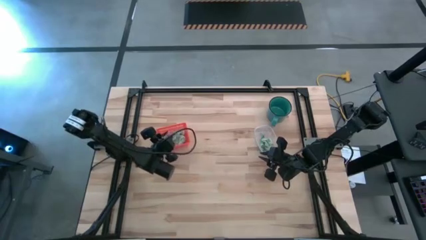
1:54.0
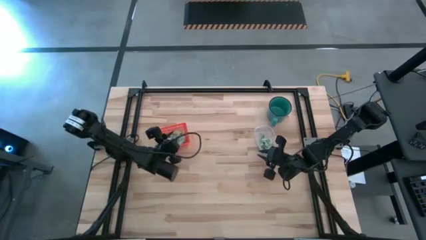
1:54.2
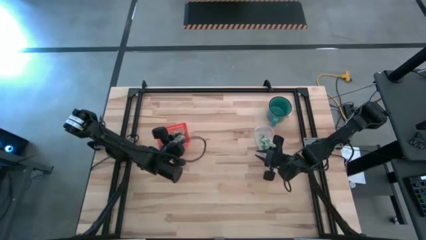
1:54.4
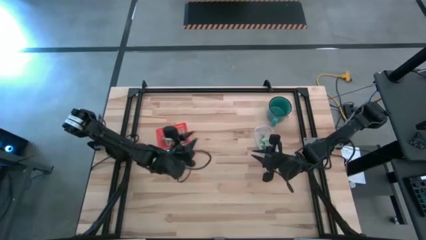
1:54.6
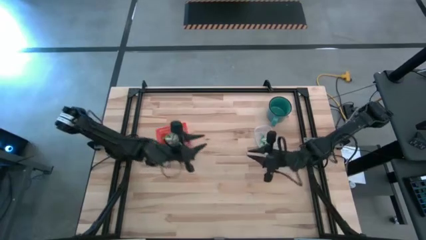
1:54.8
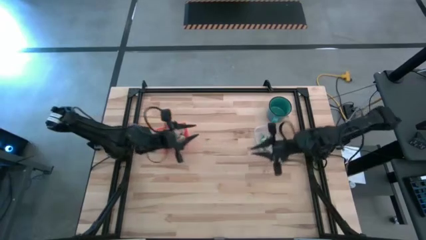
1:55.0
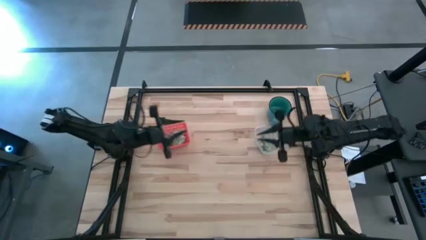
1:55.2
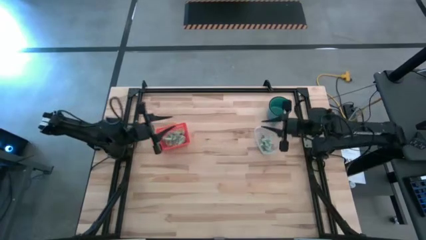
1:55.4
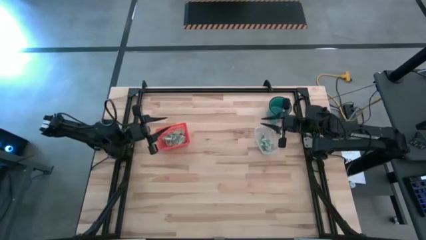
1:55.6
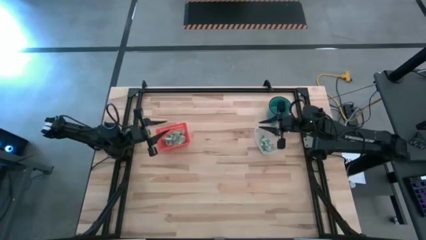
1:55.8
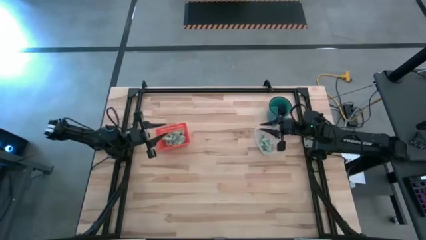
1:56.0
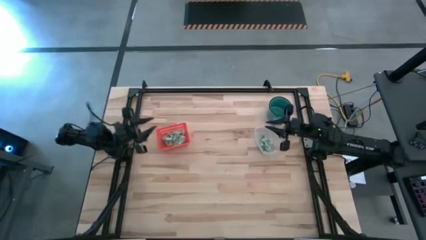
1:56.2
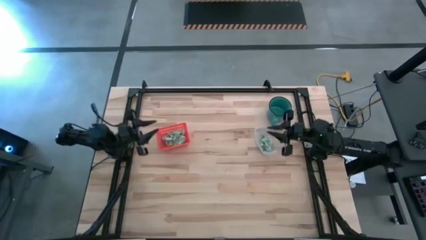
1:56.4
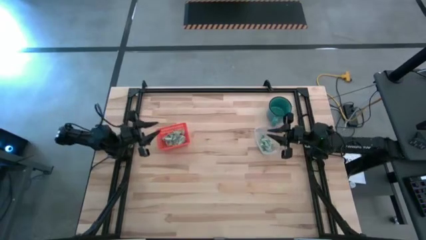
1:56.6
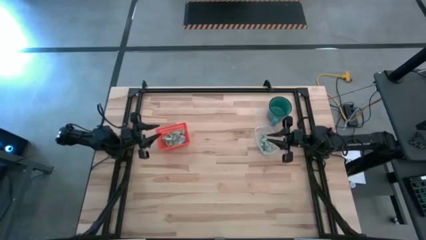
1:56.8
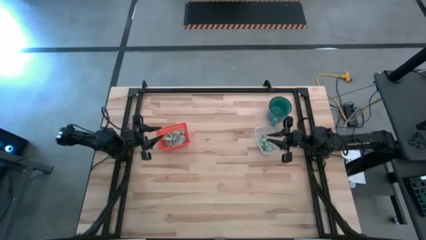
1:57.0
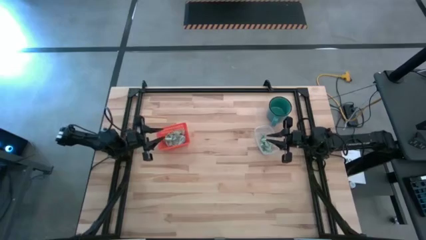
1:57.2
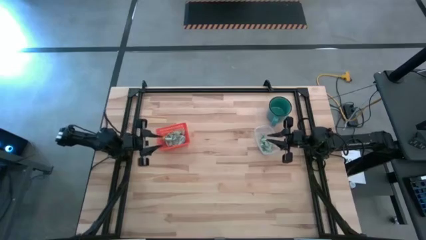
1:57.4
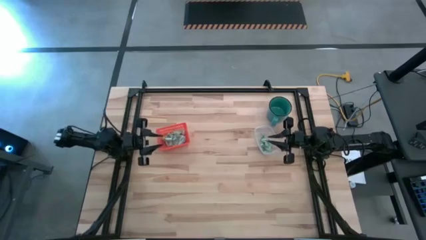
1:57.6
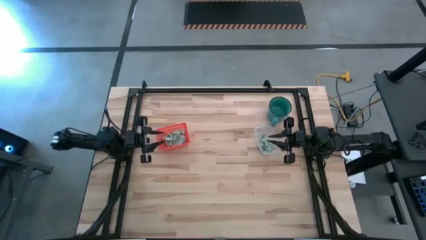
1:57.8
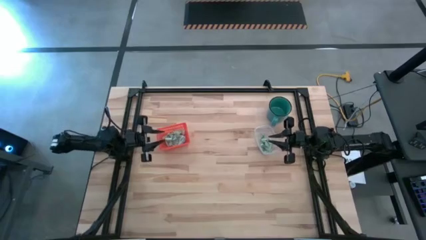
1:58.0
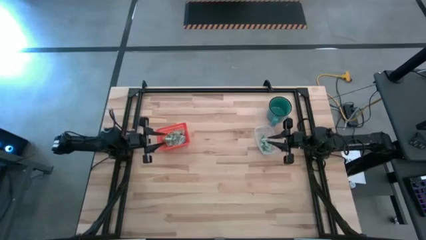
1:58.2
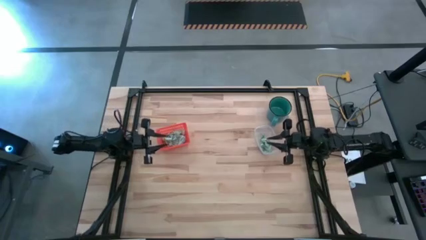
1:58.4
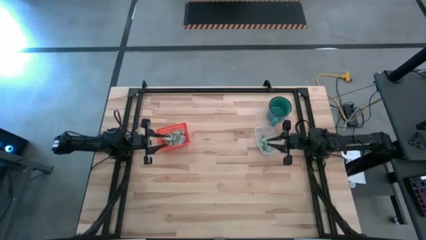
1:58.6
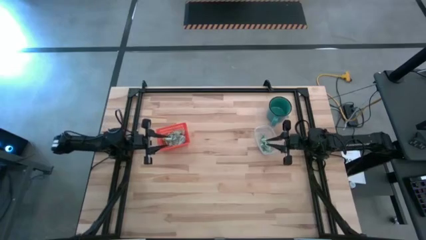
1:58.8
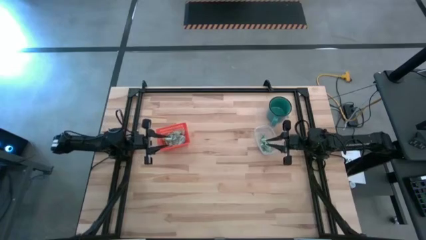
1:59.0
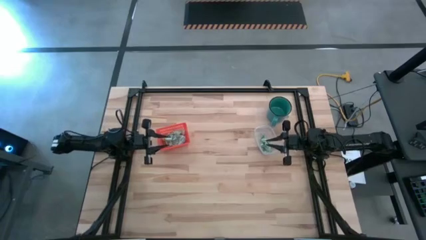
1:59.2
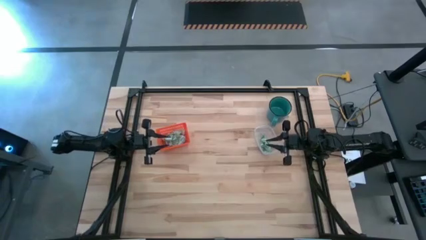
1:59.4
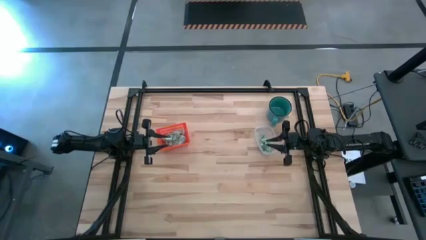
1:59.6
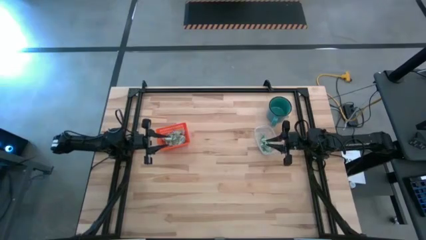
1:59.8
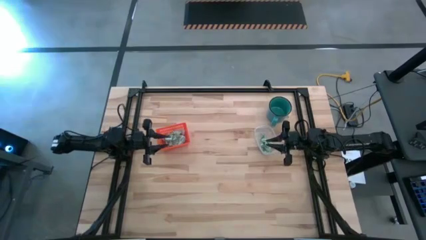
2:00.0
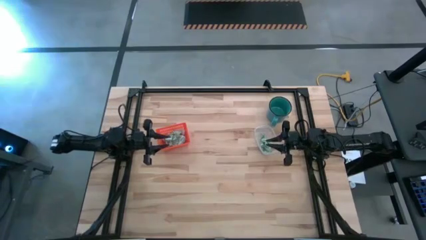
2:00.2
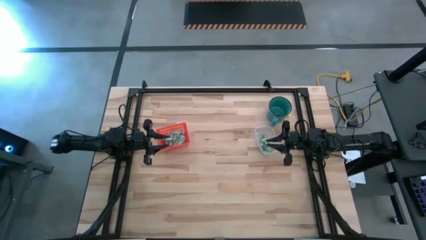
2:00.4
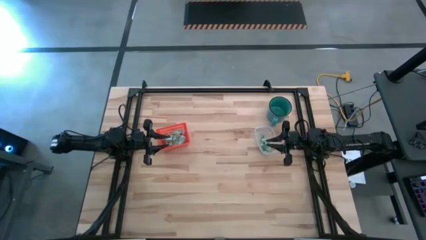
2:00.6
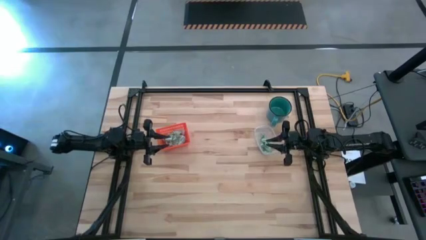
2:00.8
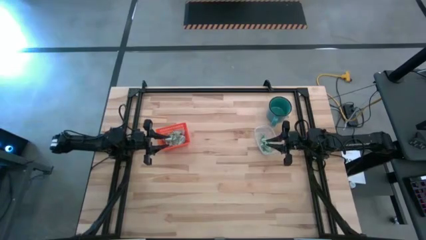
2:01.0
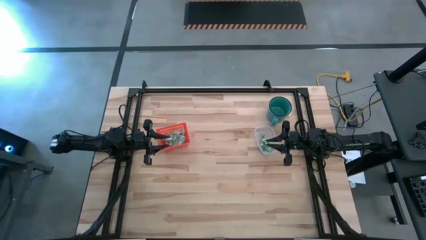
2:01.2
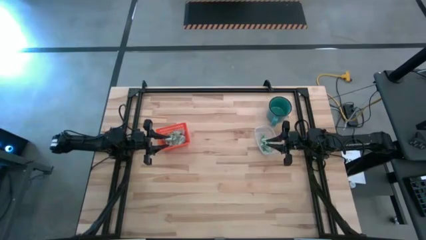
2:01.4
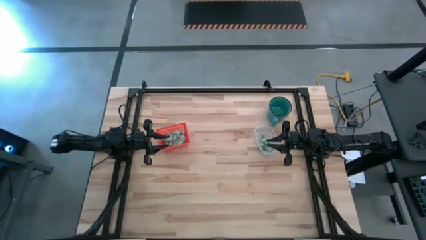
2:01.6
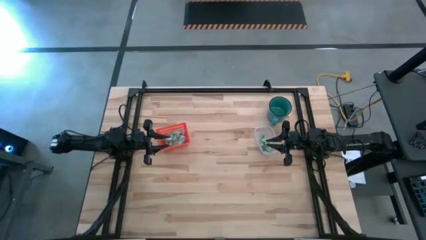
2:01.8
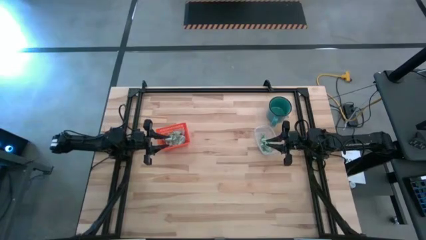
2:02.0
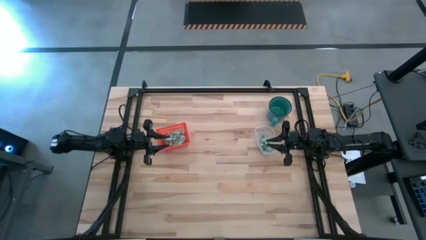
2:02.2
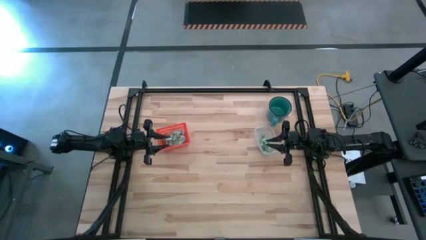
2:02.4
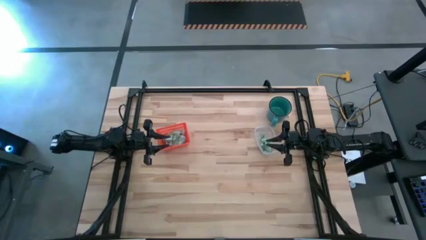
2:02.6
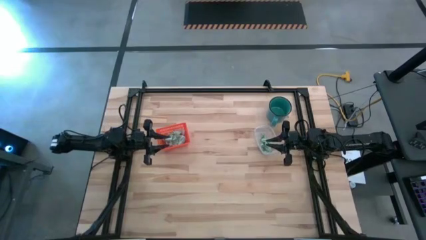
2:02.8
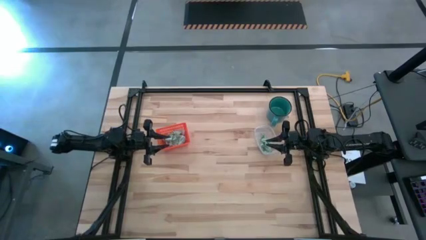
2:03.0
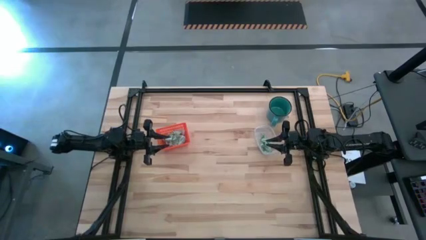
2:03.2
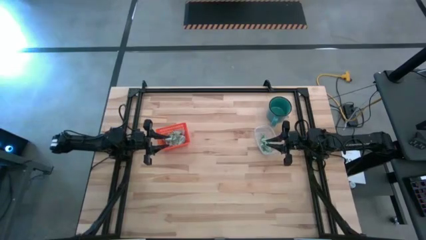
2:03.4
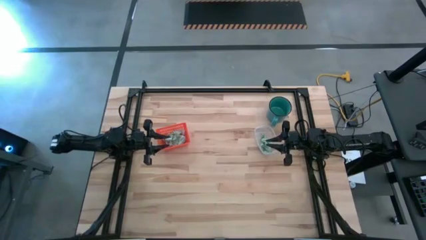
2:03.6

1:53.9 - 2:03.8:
Task: Pick and place items into bin
Return to Home Position

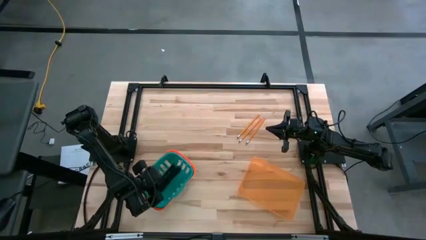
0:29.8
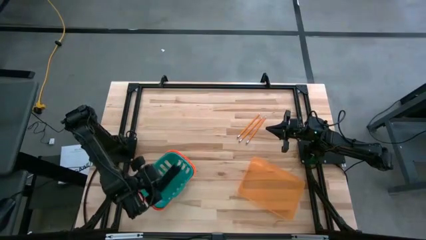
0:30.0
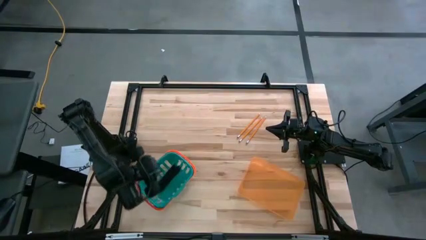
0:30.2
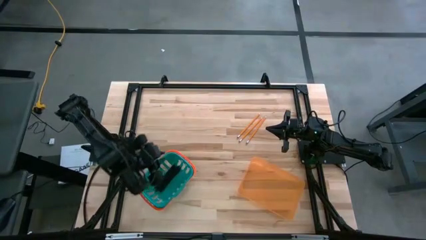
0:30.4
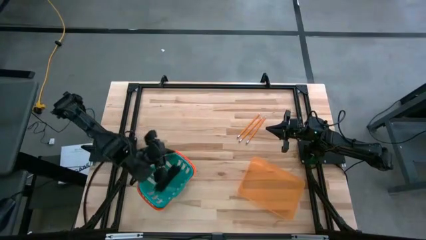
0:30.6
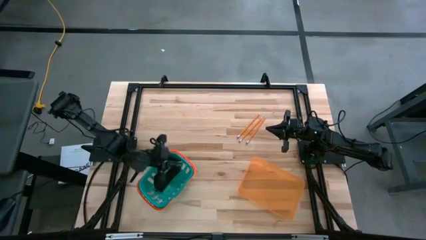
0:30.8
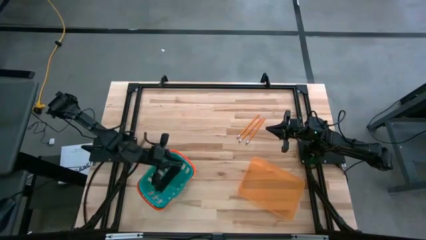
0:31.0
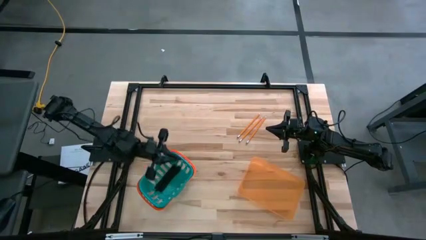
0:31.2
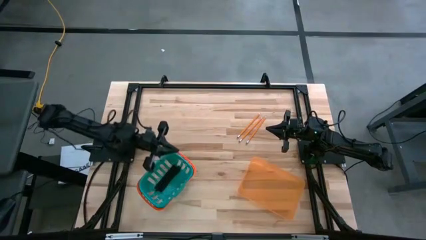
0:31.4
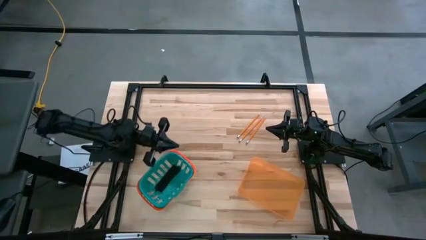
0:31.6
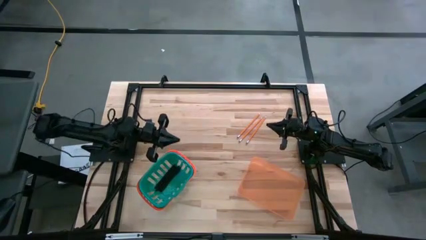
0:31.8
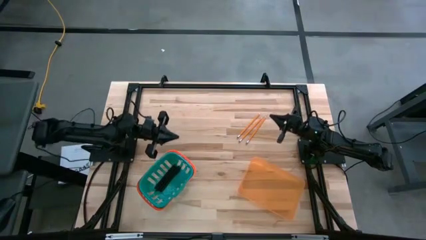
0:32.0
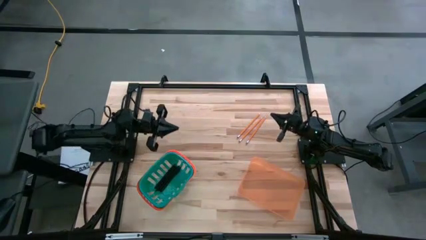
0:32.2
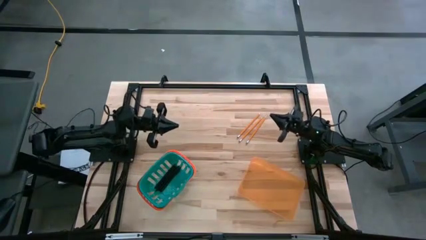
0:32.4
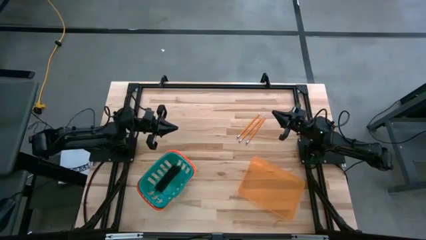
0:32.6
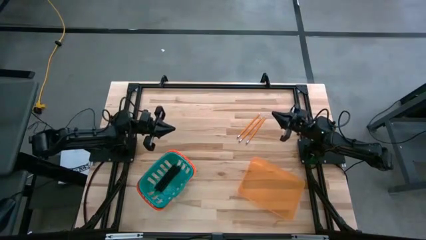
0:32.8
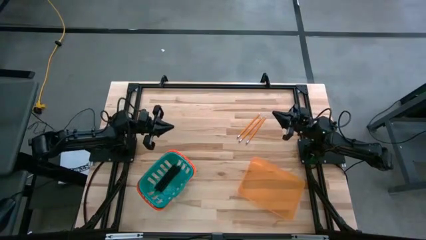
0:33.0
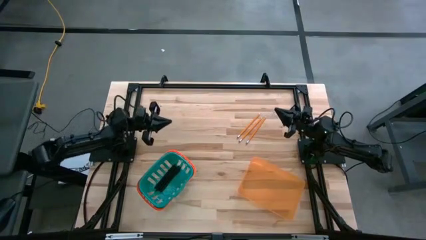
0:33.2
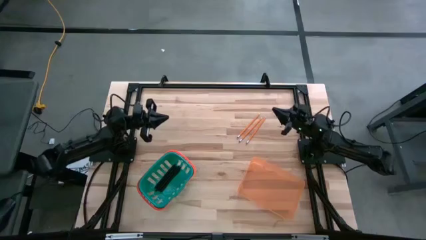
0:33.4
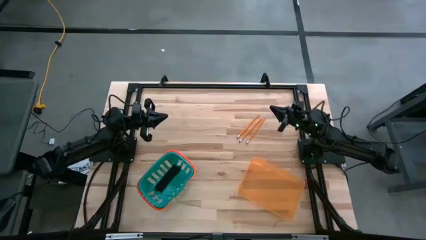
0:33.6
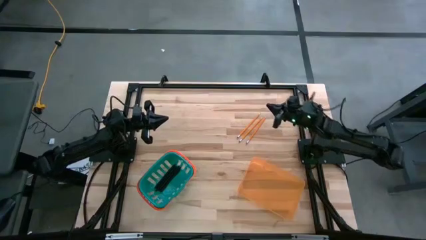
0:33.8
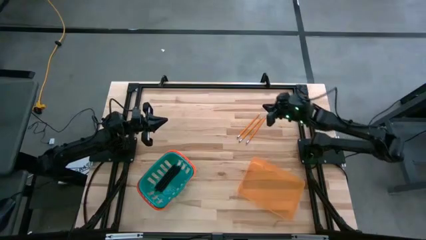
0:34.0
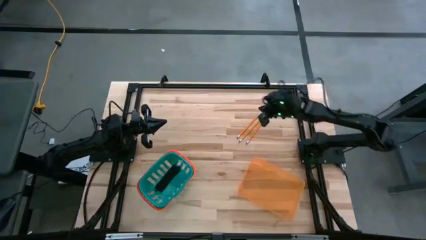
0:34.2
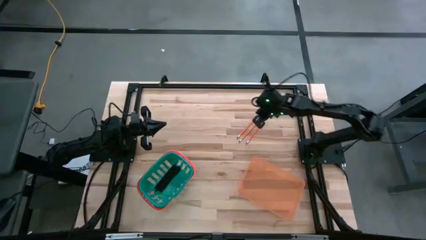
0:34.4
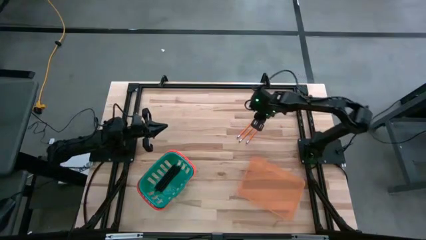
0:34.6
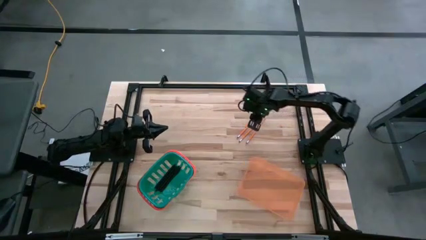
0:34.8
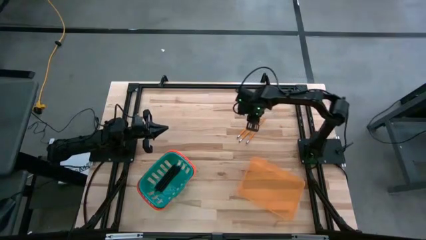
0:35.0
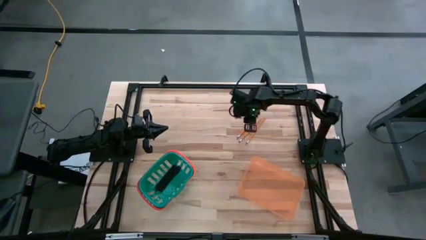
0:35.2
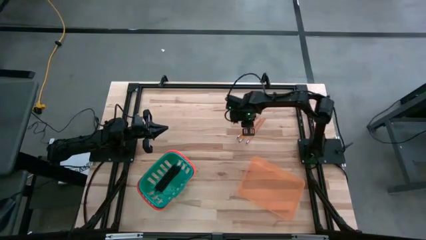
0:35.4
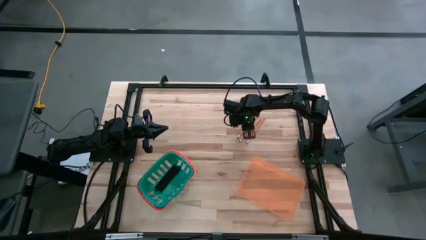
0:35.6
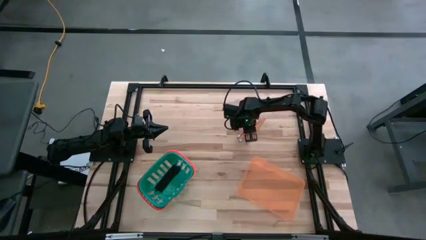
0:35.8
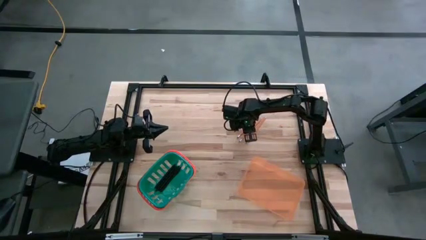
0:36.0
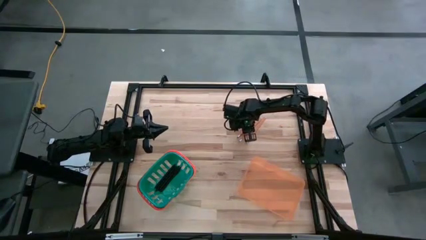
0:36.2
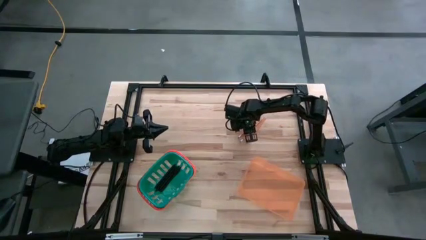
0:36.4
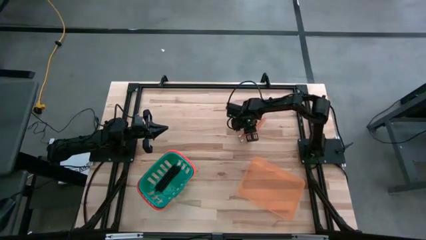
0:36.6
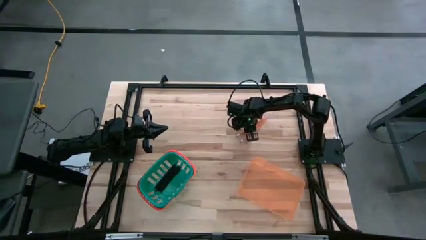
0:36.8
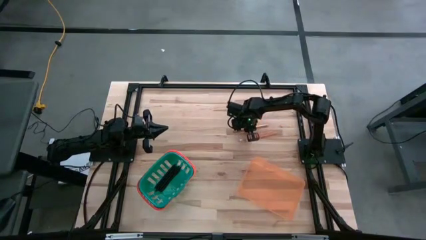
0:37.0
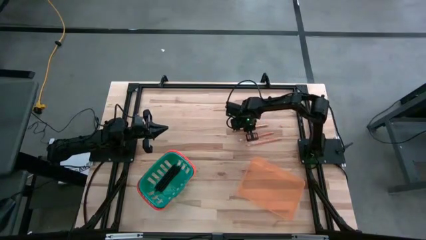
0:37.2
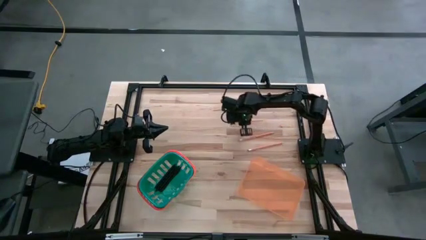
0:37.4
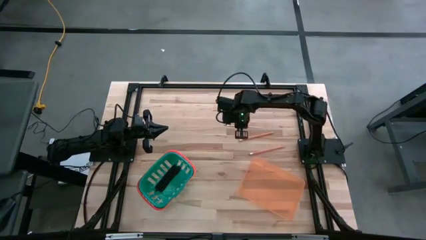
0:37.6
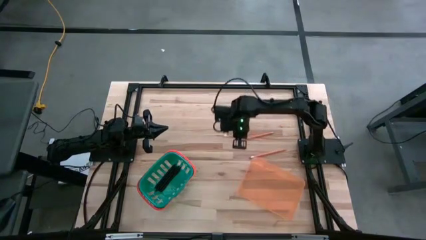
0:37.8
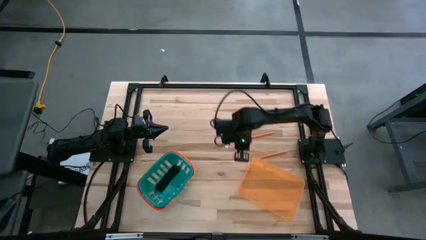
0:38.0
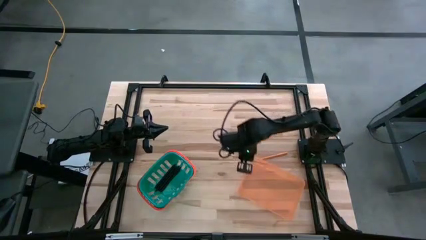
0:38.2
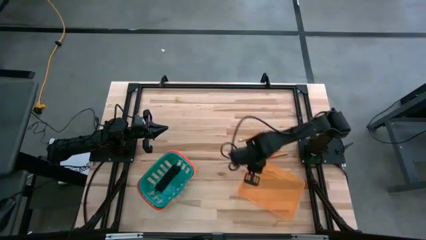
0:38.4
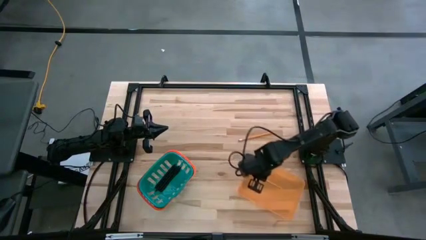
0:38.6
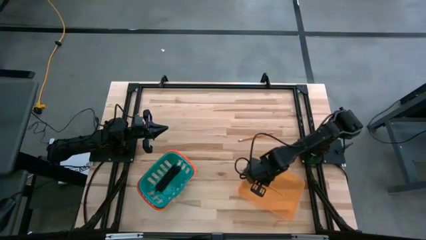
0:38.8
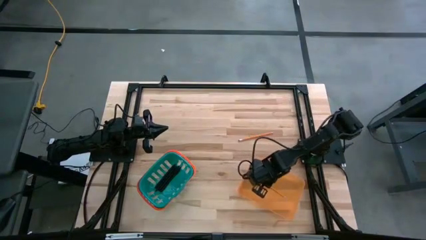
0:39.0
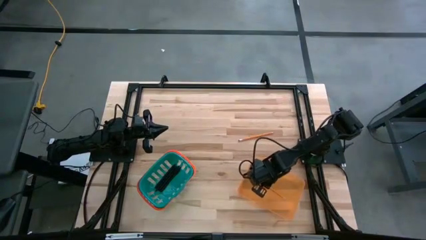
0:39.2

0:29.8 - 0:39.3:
Task: Sort pens & pencils
Put the top orange pencil into the orange bin
